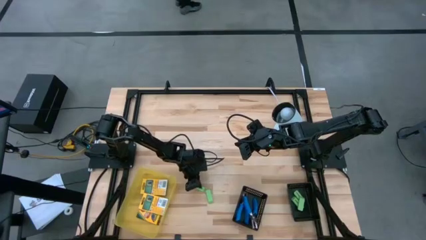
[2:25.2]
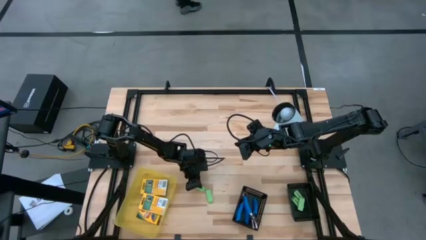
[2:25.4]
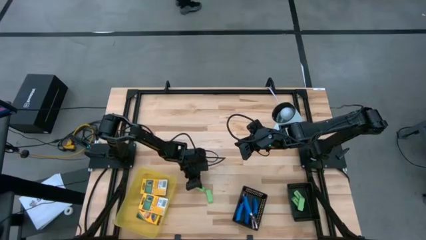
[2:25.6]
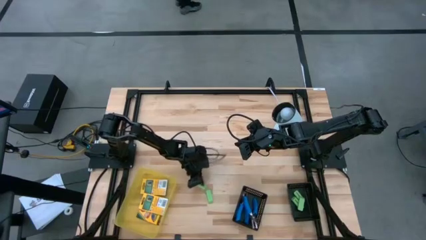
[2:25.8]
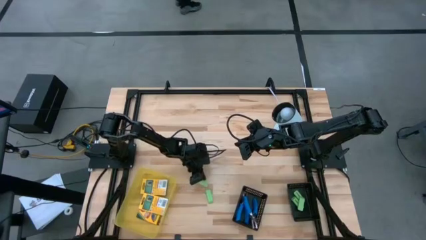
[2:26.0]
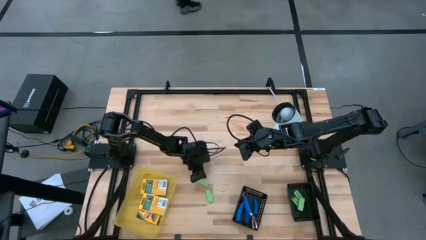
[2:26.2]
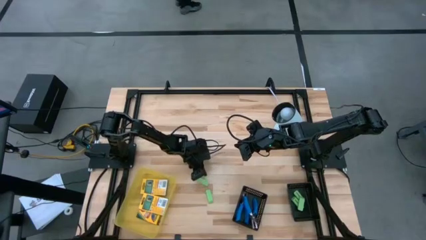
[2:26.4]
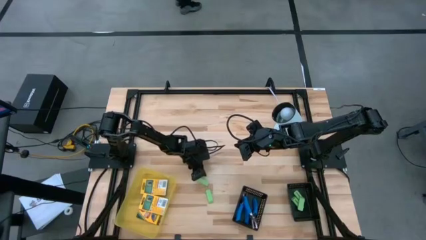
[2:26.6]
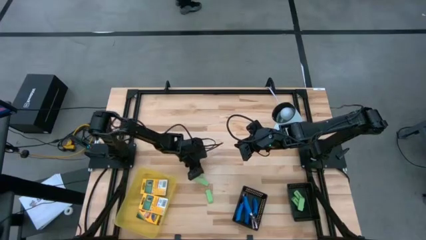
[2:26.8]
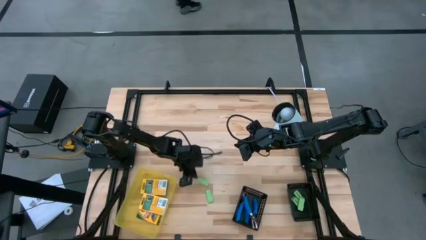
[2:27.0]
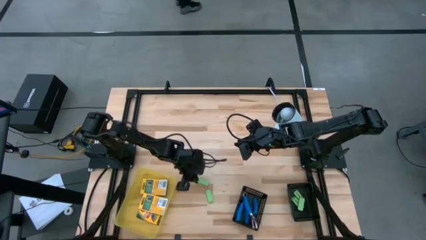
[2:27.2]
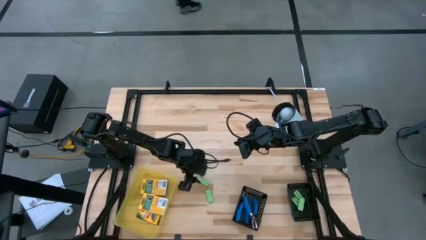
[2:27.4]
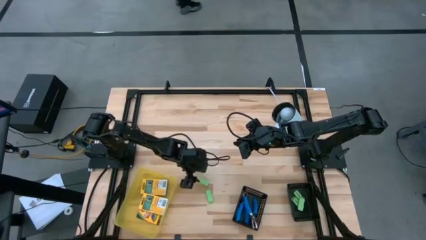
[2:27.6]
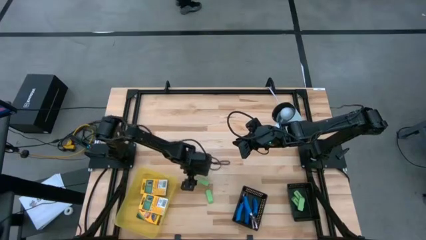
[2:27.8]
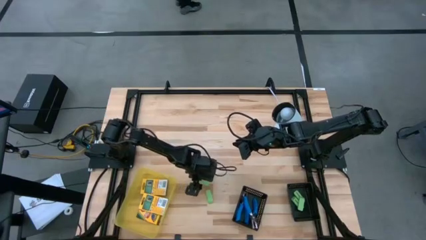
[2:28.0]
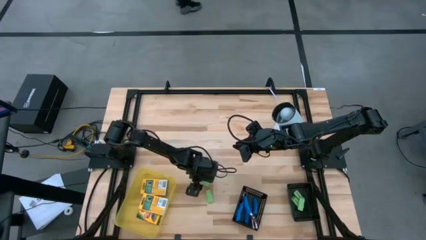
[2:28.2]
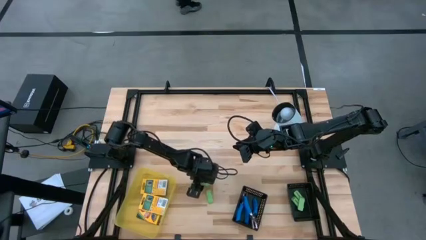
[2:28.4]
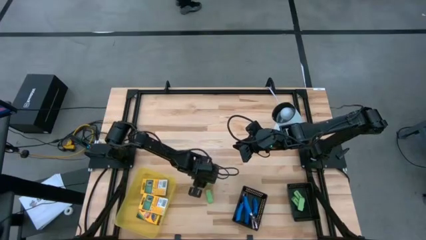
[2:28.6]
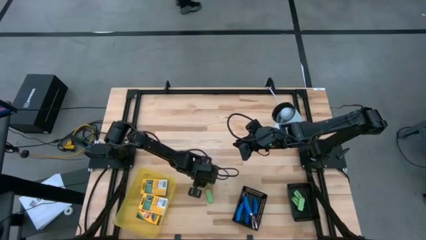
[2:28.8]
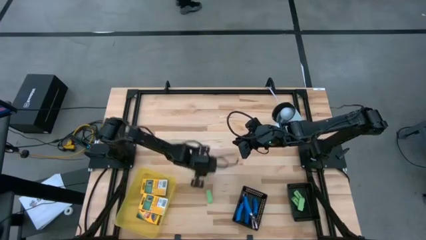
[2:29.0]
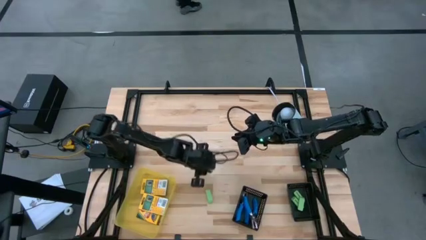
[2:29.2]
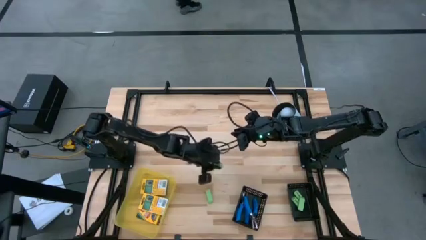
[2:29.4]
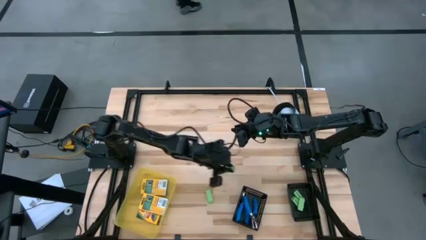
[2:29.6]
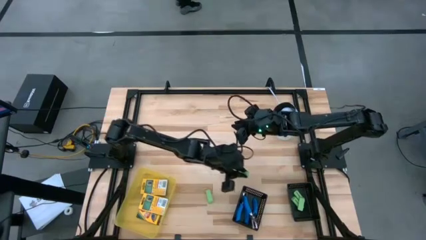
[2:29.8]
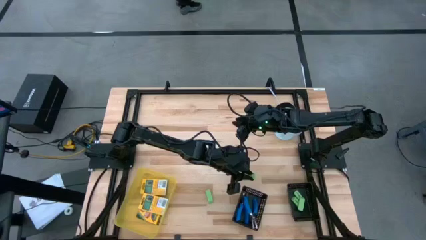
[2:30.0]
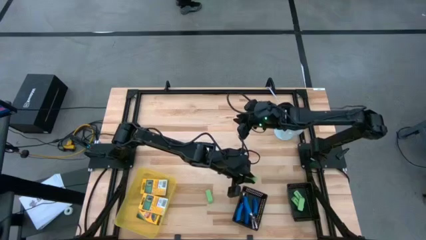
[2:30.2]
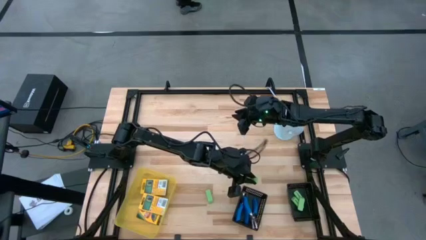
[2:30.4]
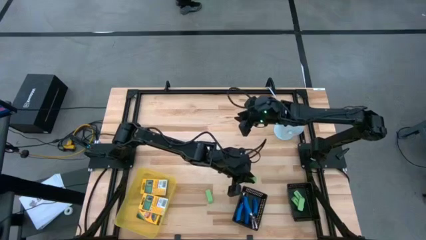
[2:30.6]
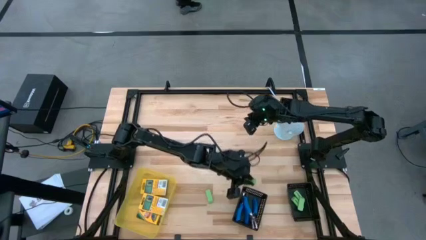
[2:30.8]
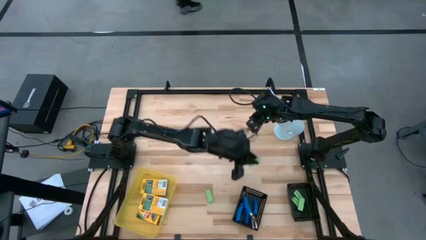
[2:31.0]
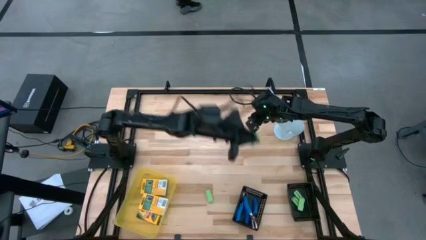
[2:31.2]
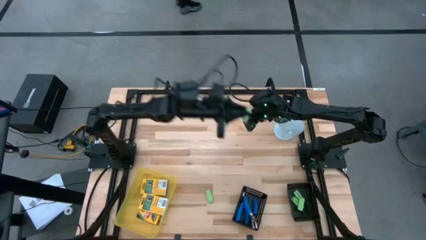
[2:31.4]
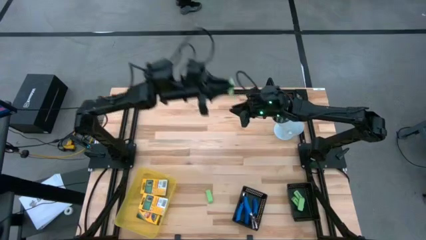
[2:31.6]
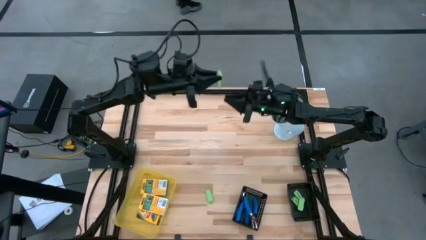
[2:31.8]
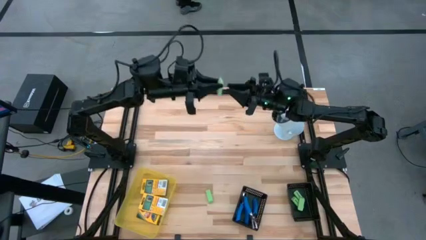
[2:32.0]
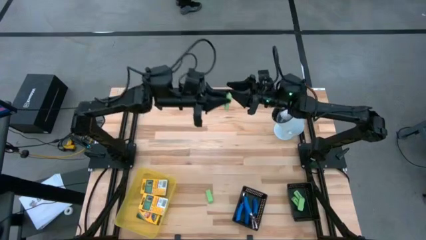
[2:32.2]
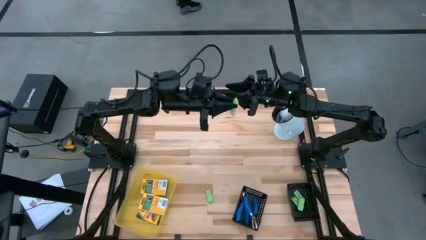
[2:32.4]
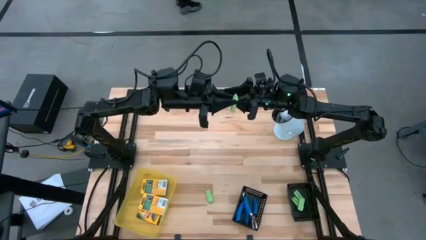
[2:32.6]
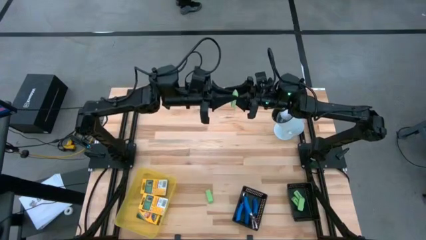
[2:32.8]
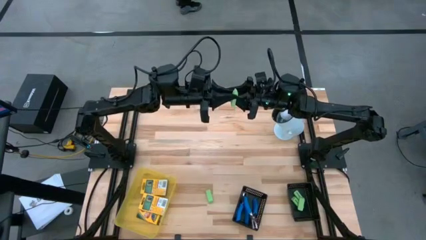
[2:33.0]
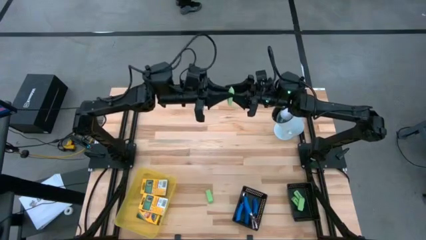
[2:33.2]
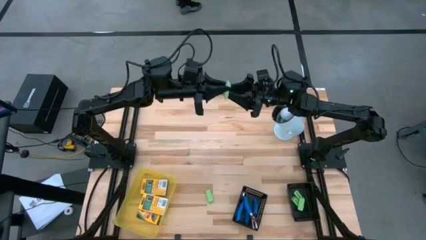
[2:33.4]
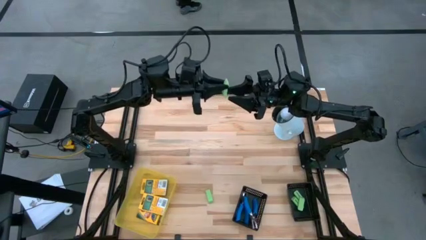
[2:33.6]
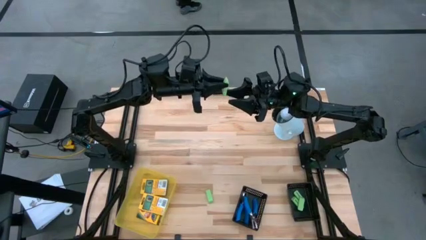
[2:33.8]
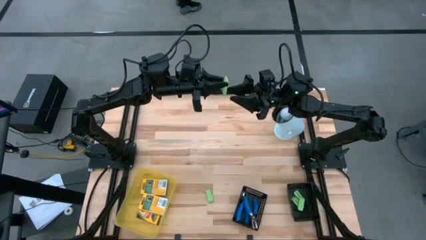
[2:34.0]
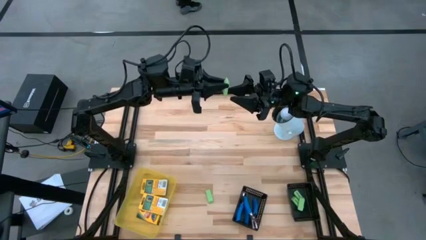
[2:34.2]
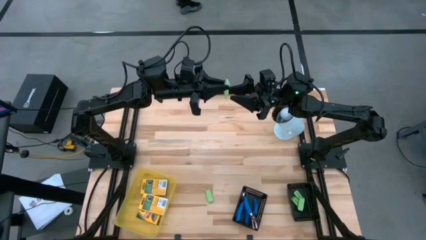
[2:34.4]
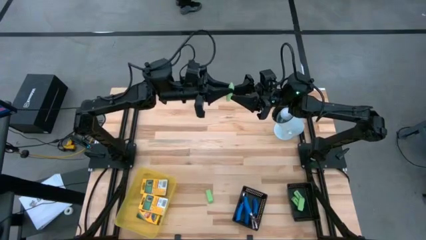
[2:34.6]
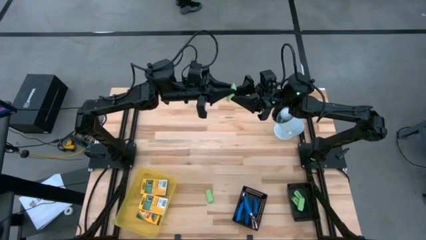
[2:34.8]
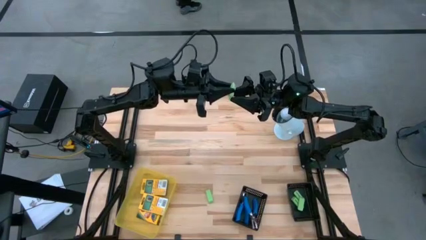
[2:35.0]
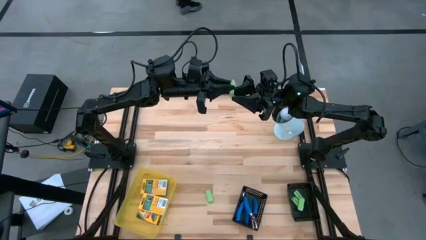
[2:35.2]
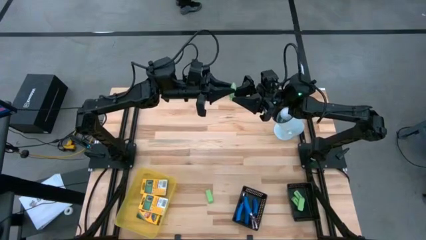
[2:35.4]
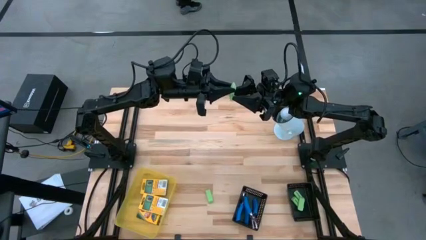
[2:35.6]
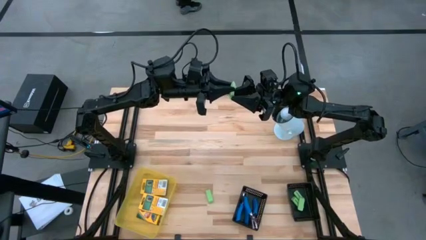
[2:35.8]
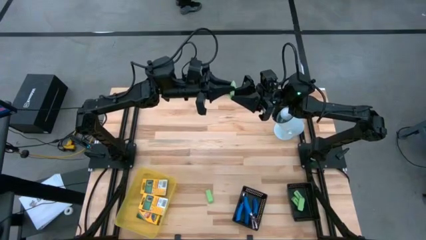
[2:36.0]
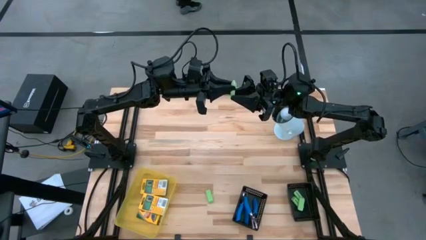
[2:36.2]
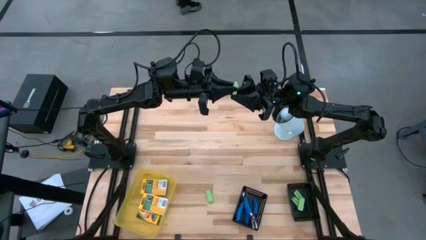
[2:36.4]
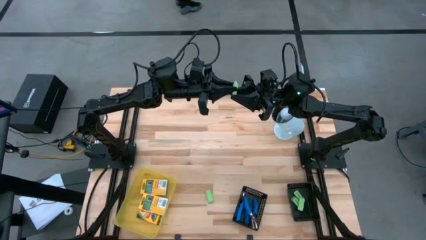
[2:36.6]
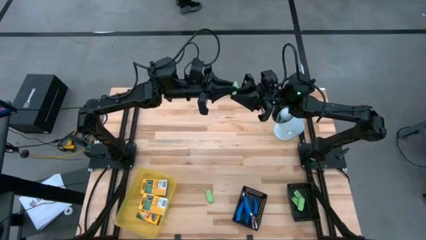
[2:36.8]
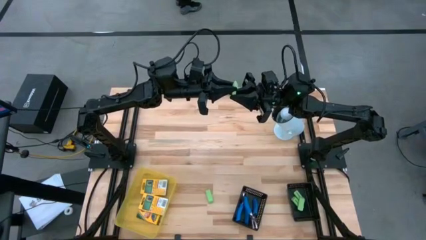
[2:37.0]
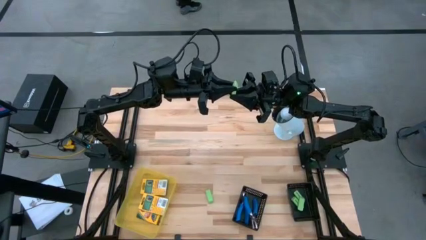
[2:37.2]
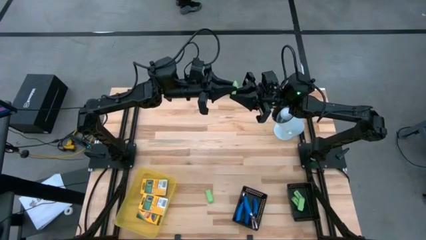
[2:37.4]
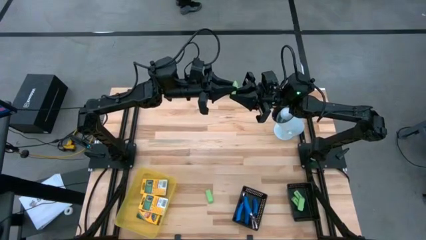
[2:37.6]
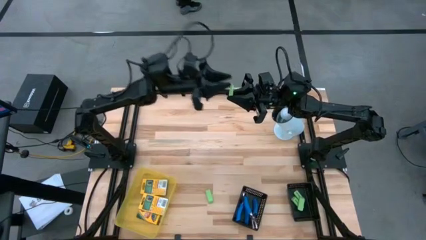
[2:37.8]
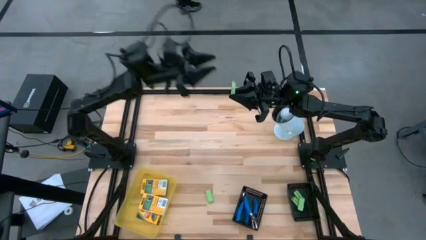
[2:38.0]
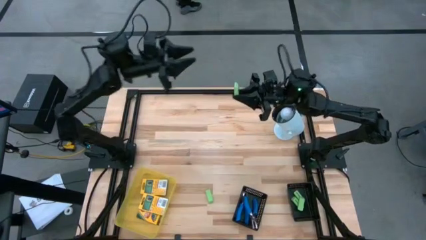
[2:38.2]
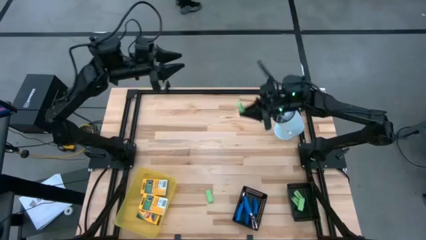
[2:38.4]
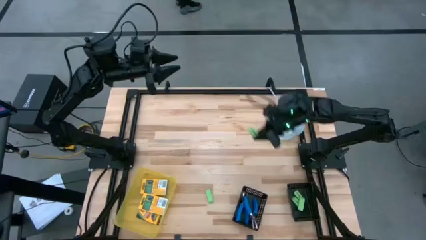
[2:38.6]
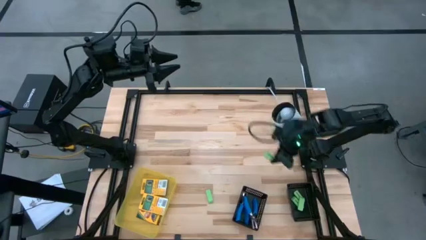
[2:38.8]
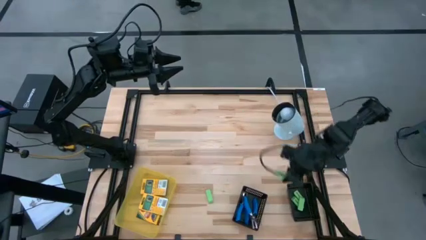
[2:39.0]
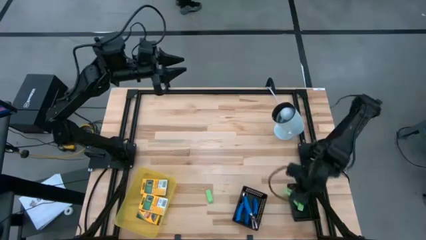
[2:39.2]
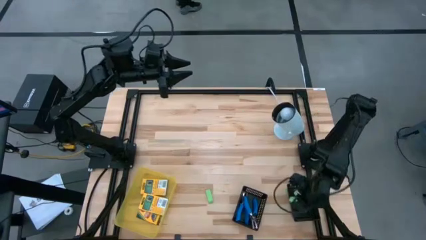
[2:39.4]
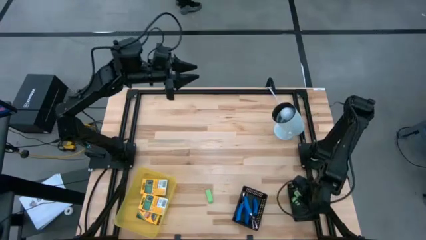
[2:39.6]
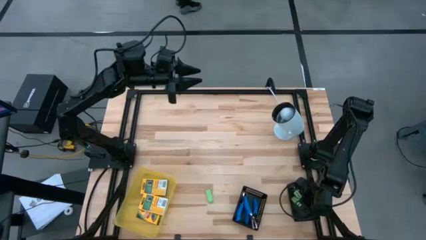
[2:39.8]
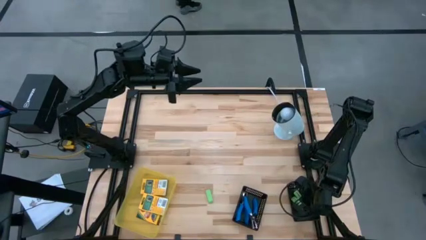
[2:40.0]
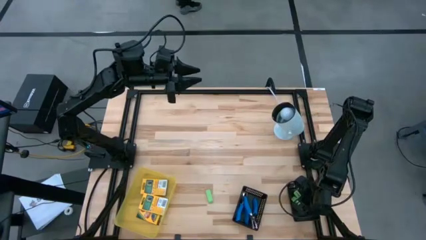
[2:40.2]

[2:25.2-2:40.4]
Task: Pick & Place School Supplies
Put the green eraser into the right black bin

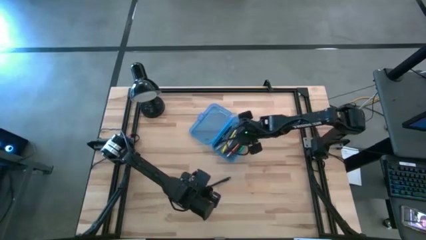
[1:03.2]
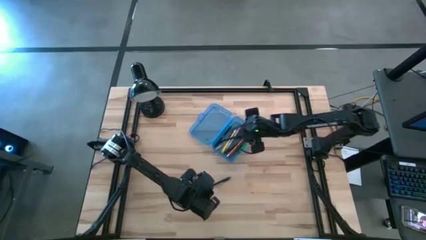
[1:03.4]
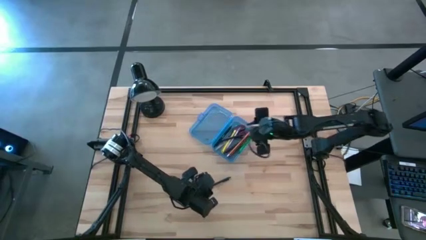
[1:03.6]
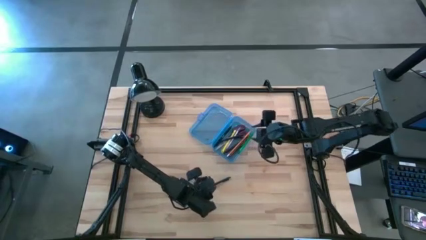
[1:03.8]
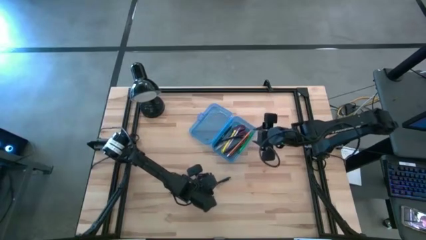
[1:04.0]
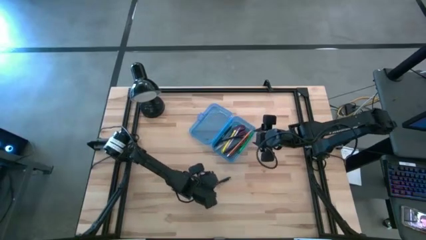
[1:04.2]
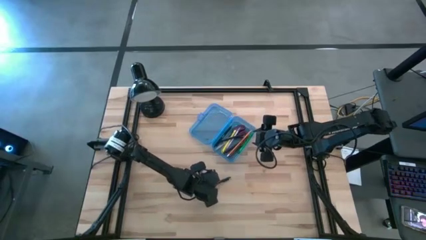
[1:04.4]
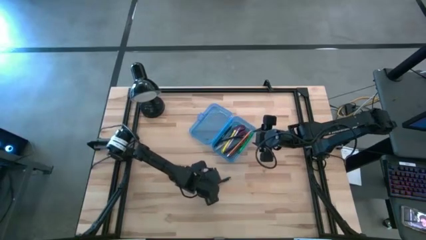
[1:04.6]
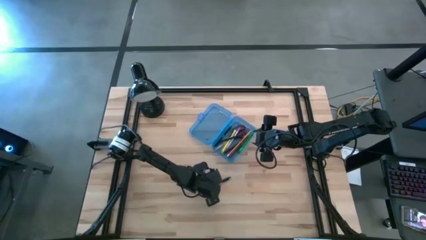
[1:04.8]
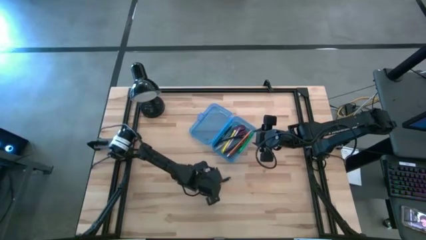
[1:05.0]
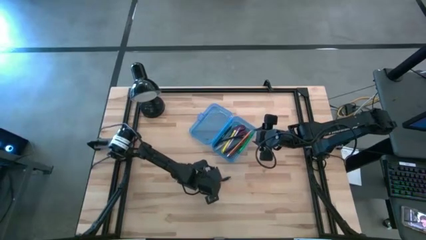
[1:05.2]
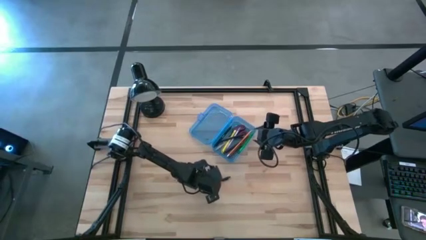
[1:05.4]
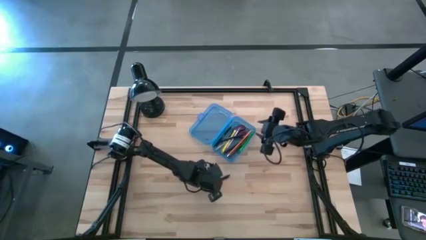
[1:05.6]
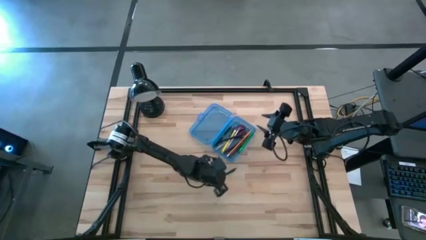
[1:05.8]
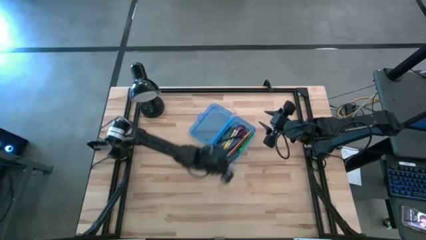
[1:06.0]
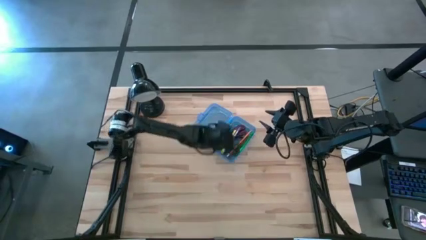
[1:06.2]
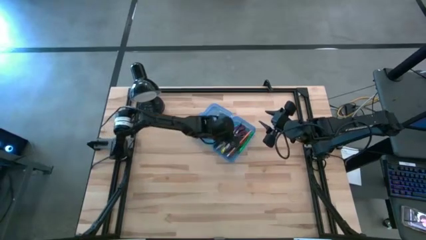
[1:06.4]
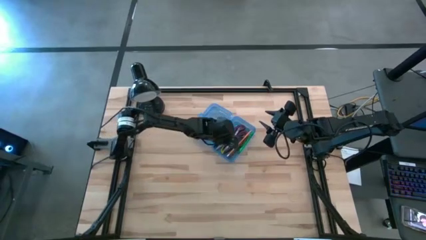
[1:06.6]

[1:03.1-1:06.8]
Task: Pick & place school supplies into a supply box
Put the pen into the supply box
